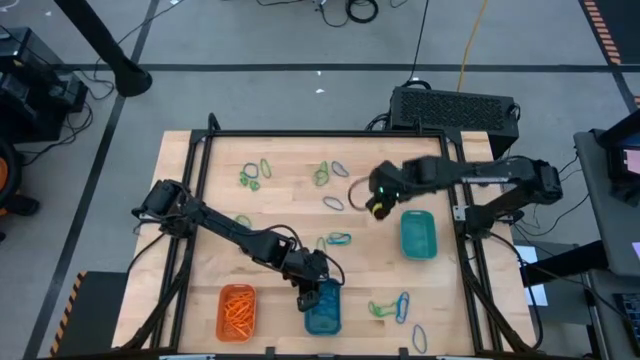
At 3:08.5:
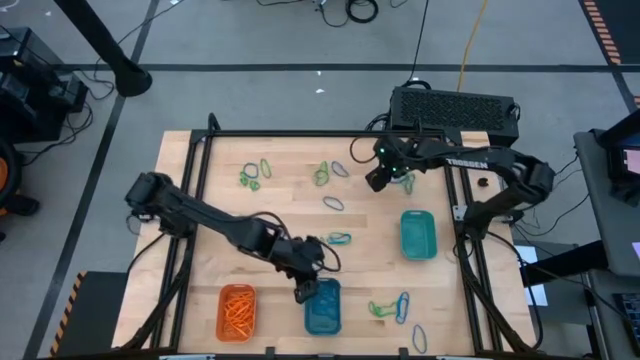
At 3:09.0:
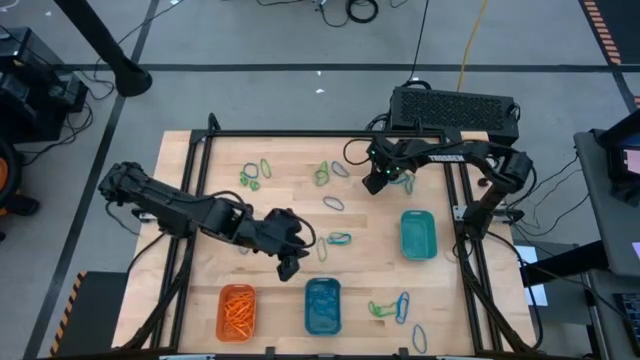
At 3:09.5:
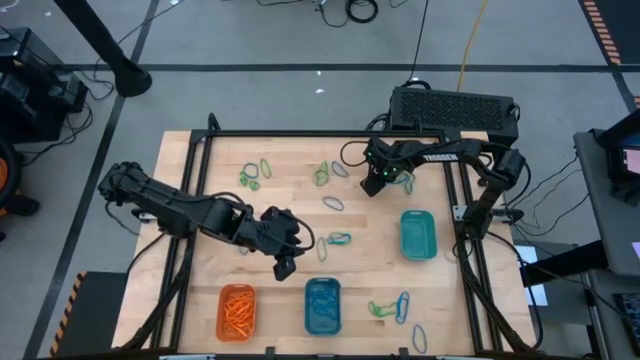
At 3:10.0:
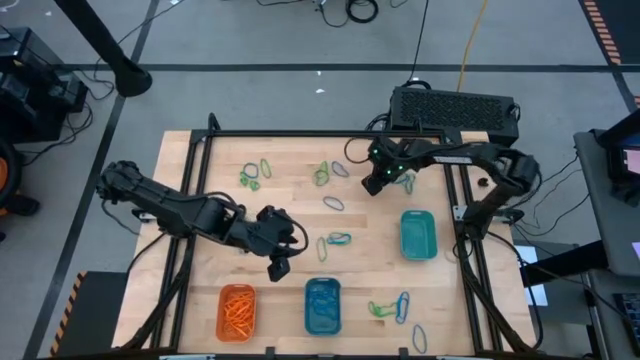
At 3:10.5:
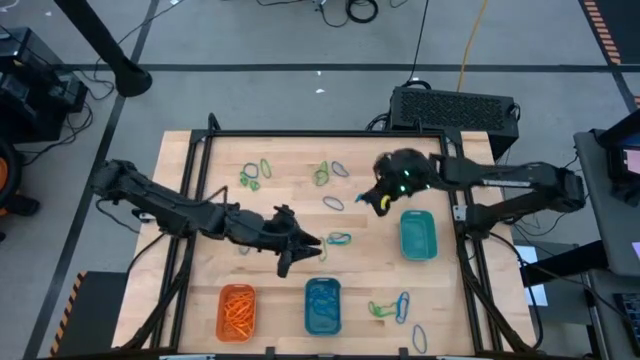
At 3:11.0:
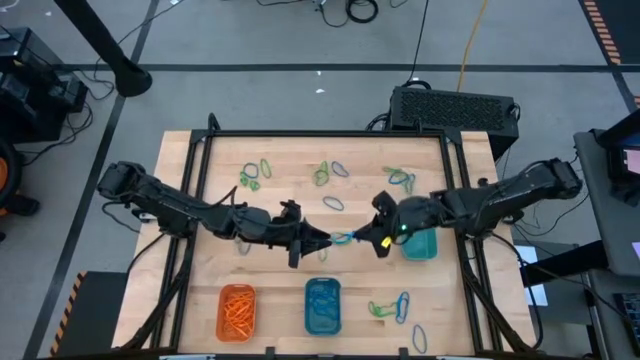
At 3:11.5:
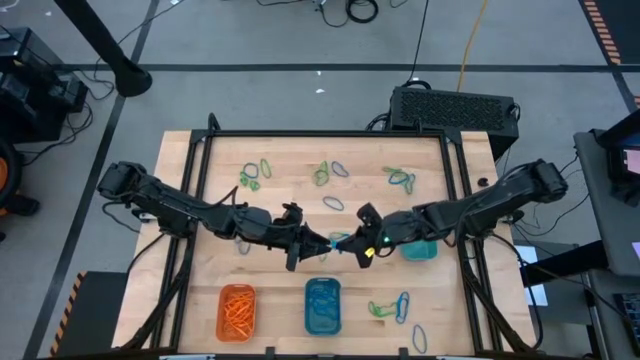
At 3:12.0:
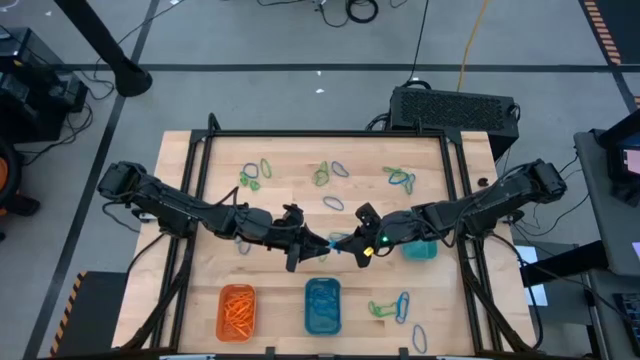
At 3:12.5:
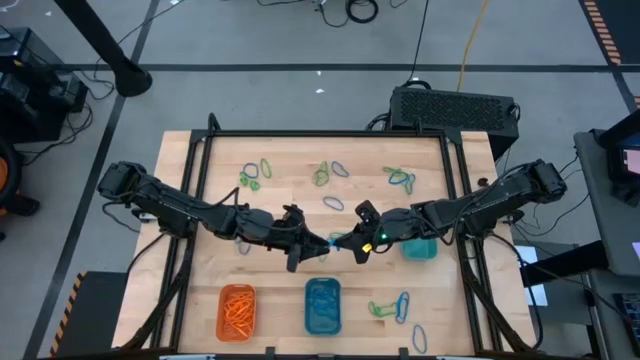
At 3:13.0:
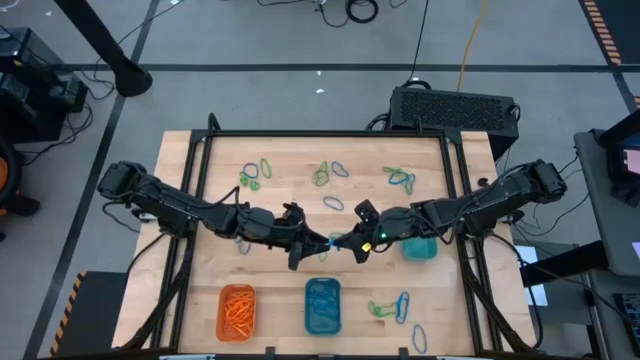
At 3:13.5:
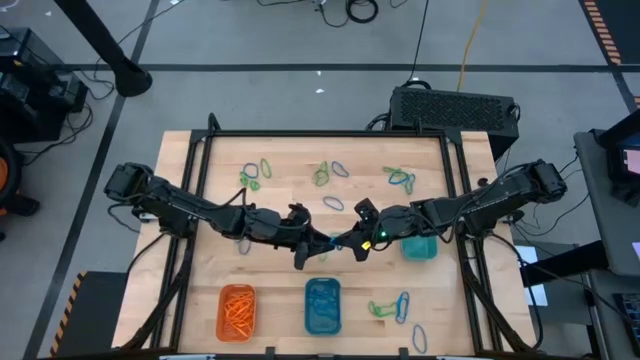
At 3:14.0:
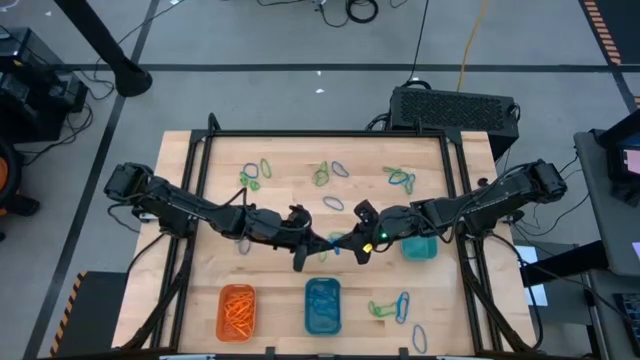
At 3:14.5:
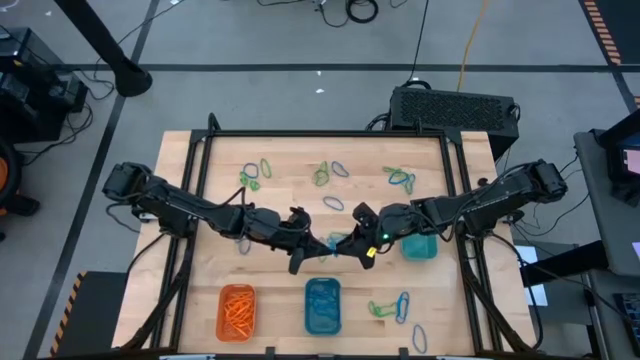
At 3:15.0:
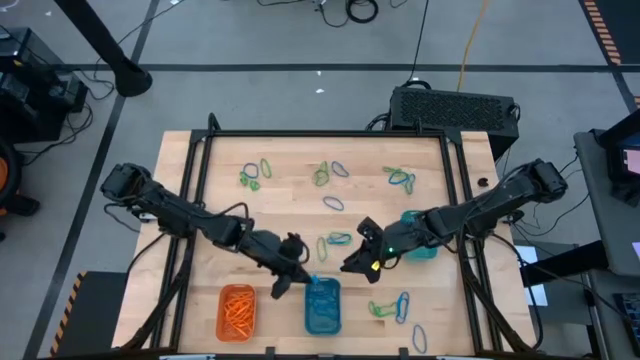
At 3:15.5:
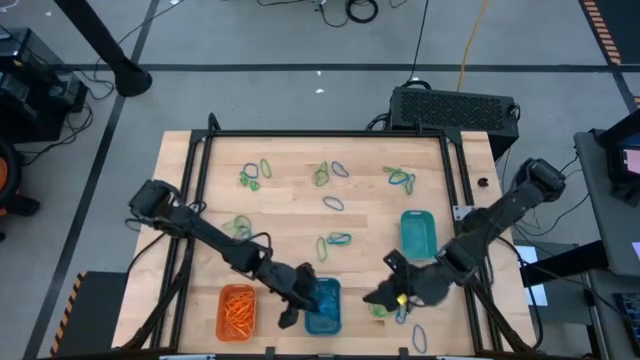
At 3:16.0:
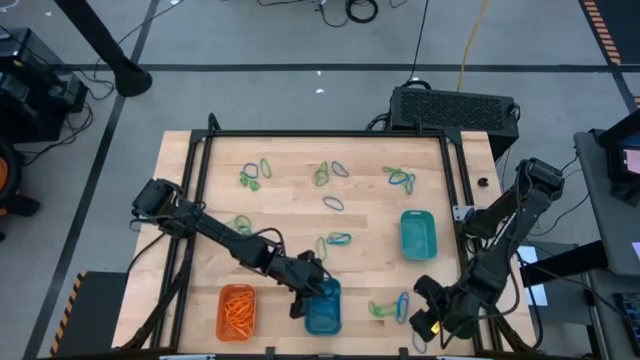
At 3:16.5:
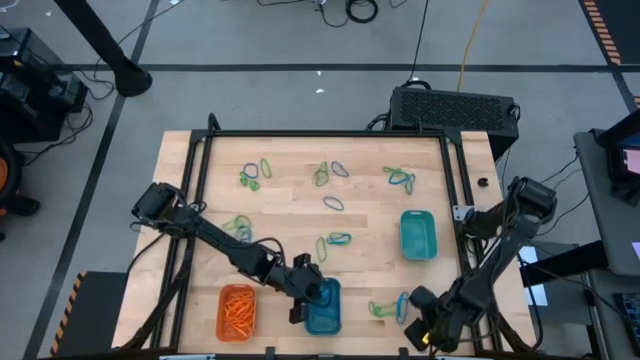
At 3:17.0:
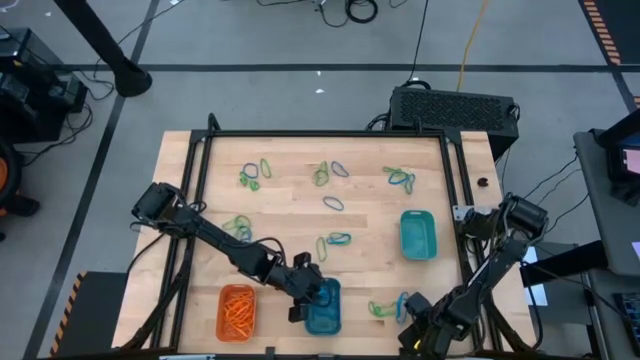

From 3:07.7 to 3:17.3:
Task: Sort rubber bands into baskets
Put the blue rubber band into the blue bin

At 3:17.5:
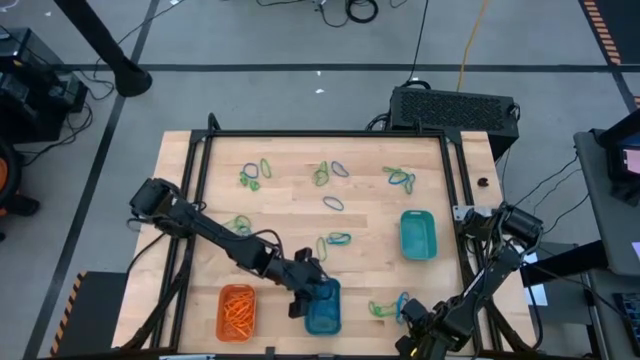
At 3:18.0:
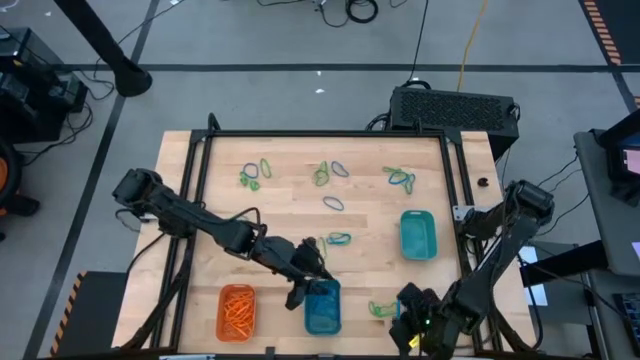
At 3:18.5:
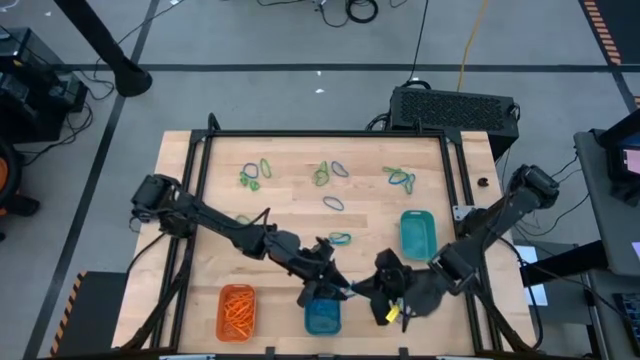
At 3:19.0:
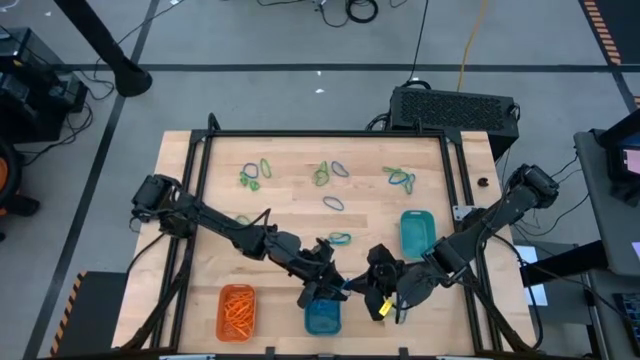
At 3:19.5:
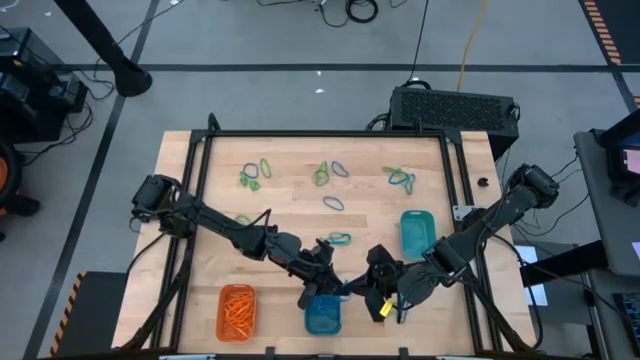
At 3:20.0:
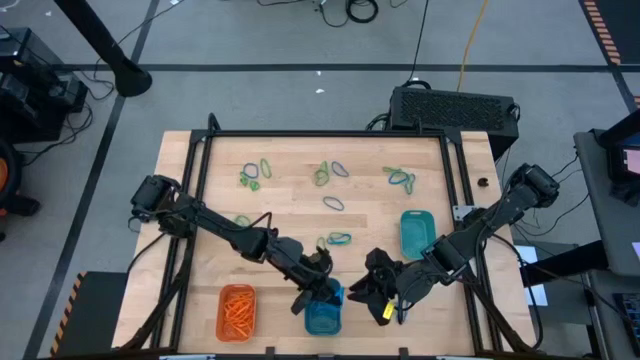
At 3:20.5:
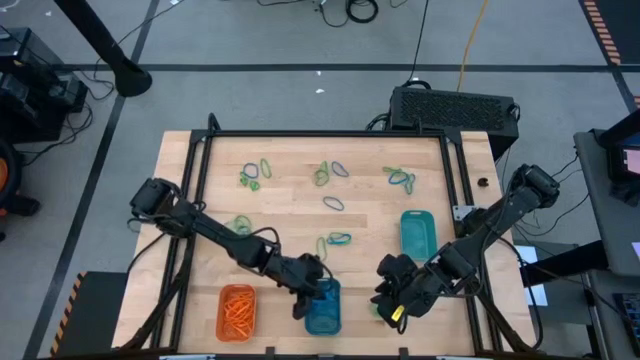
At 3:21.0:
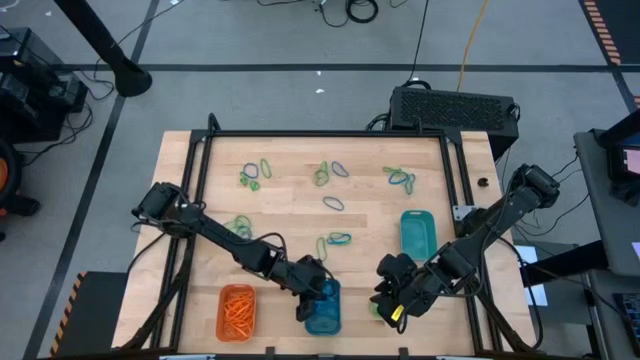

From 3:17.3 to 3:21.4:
Put the blue rubber band into the blue bin

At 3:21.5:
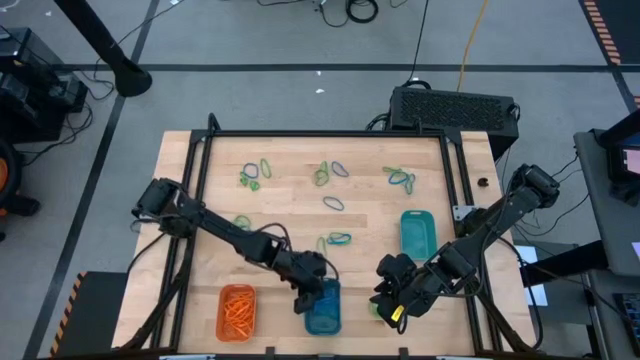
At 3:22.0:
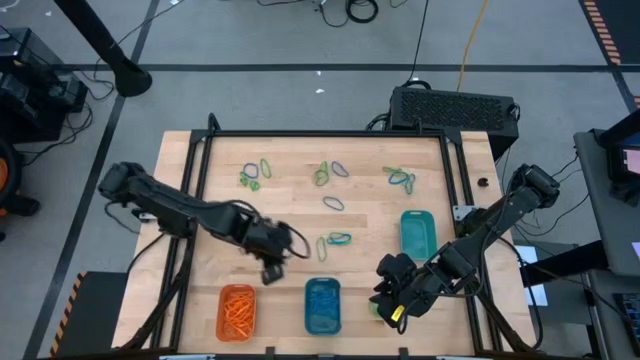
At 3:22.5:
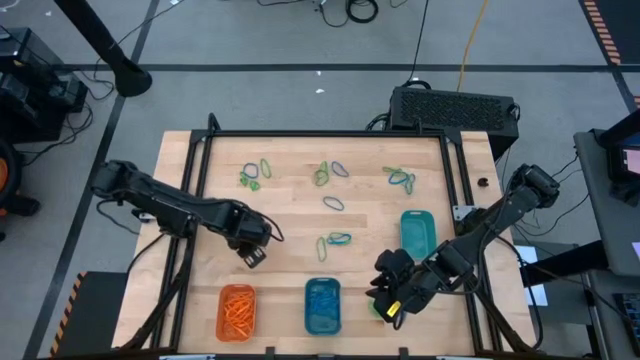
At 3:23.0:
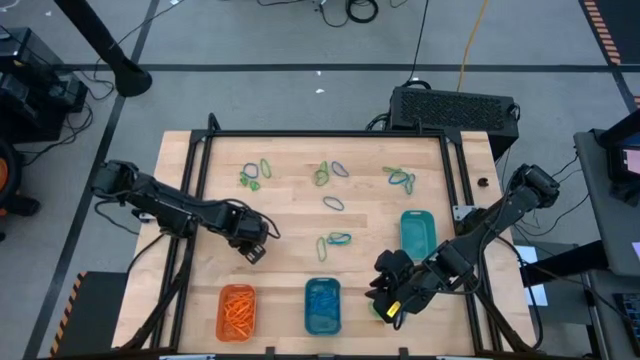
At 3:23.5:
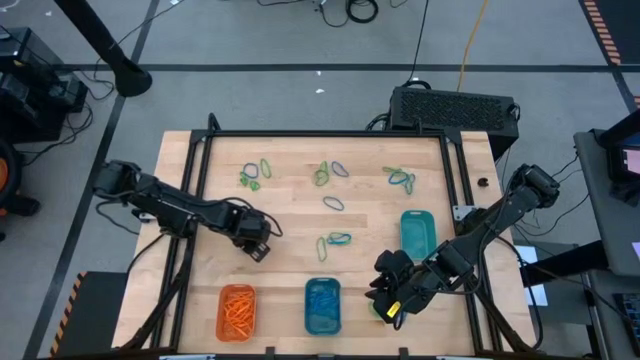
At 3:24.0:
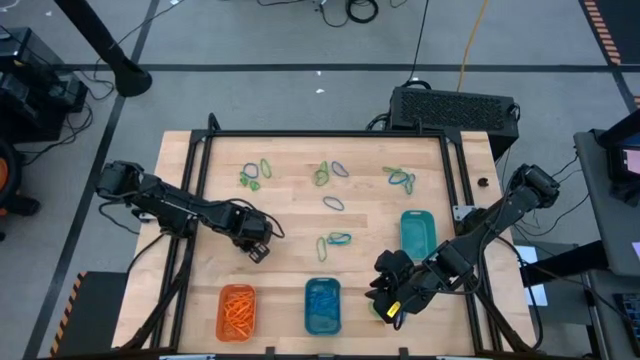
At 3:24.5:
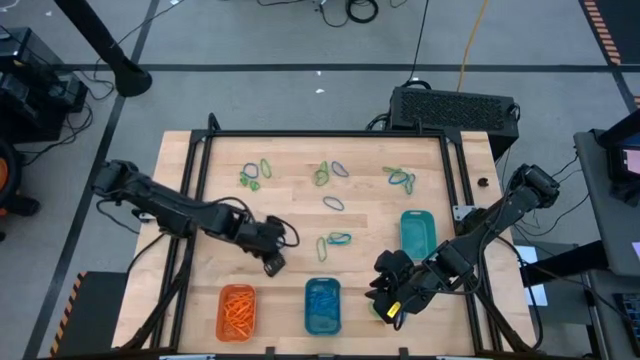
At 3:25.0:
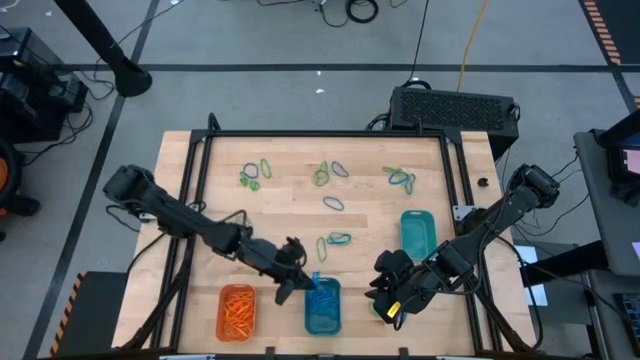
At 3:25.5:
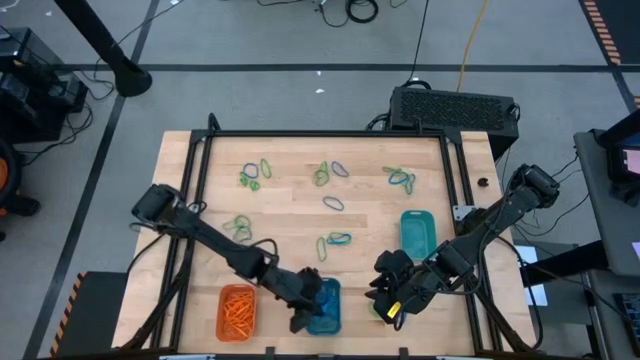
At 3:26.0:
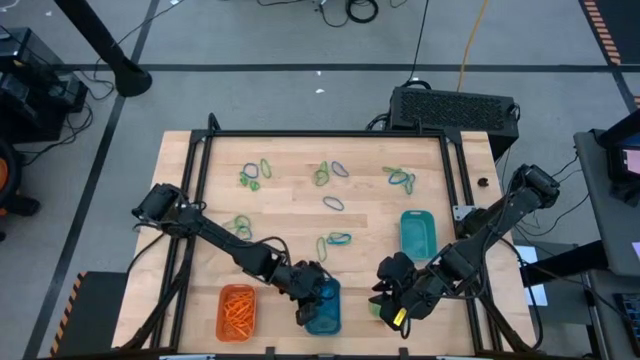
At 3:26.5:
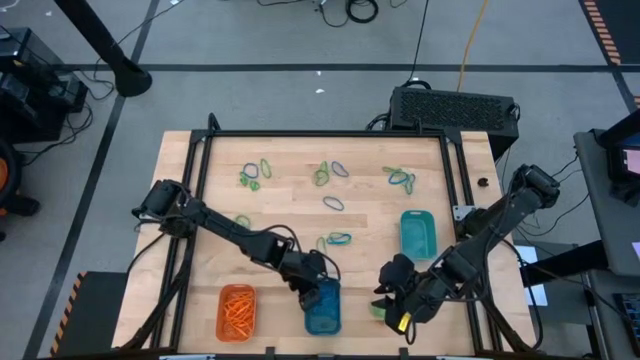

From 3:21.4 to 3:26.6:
Put the blue rubber band into the blue bin

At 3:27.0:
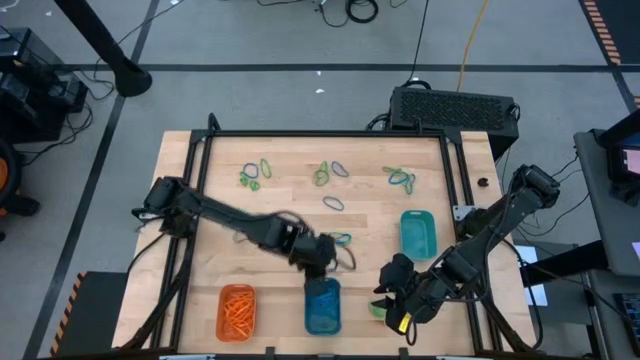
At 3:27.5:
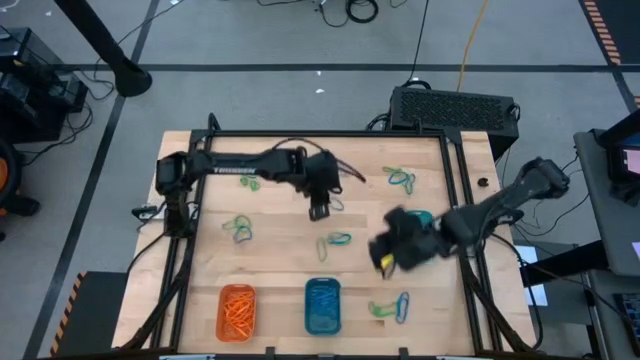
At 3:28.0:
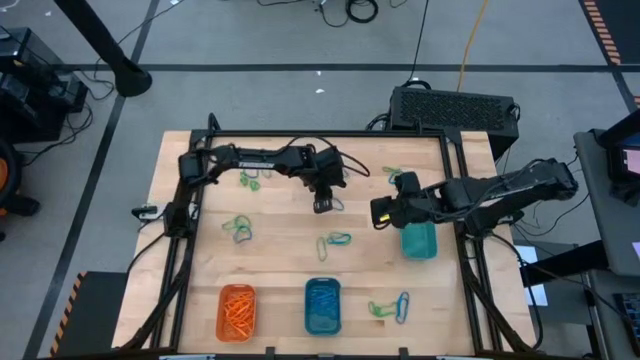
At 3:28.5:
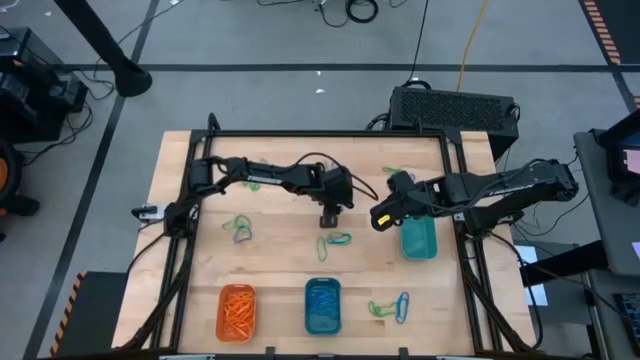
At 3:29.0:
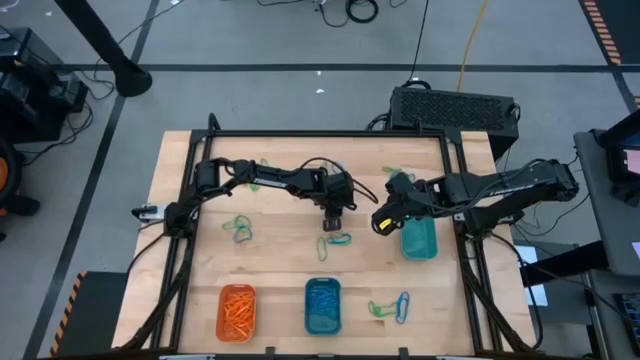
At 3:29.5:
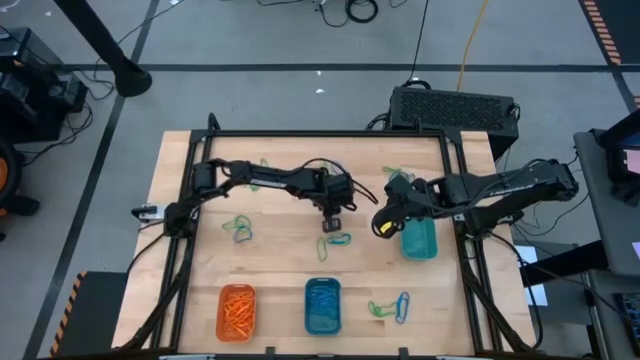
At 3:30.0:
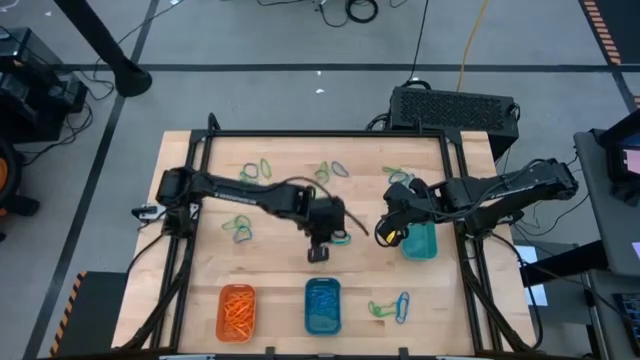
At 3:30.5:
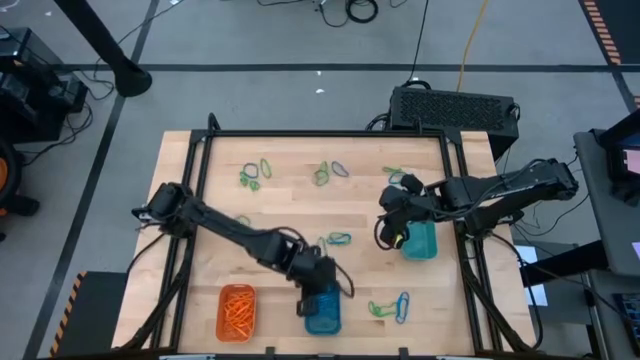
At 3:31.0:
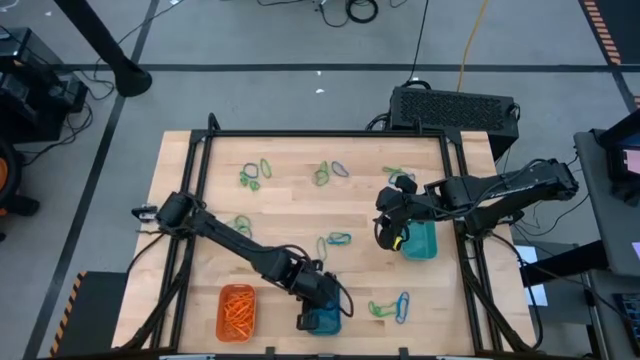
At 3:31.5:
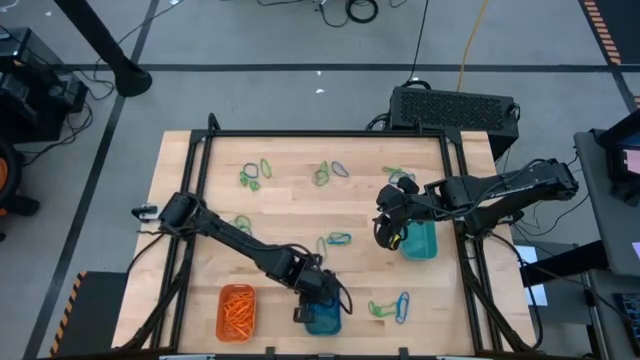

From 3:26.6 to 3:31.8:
Put the blue rubber band into the blue bin
